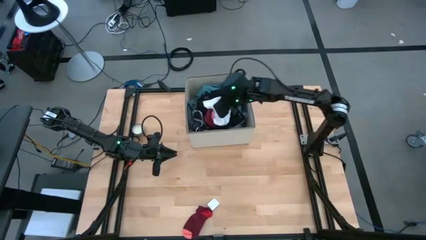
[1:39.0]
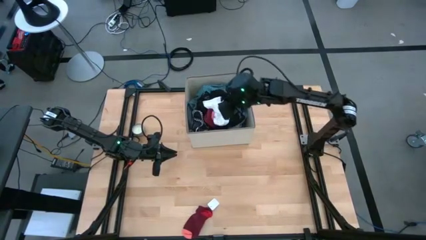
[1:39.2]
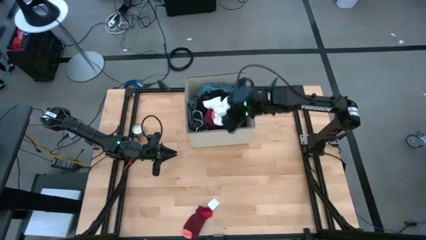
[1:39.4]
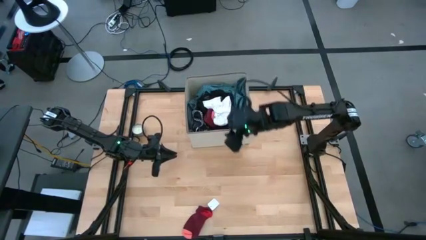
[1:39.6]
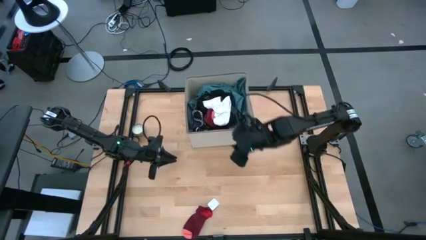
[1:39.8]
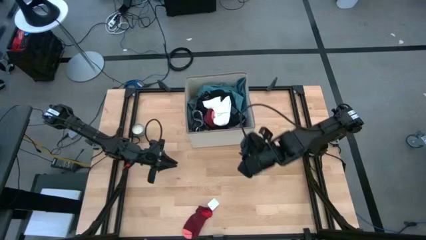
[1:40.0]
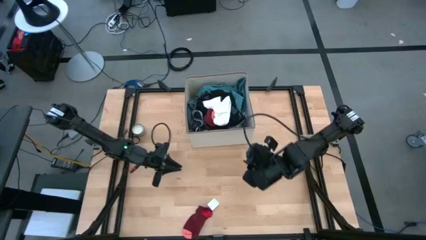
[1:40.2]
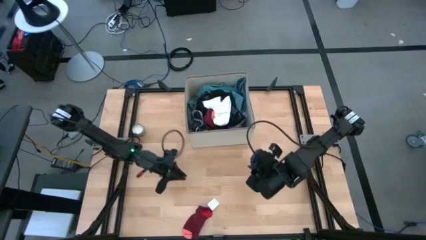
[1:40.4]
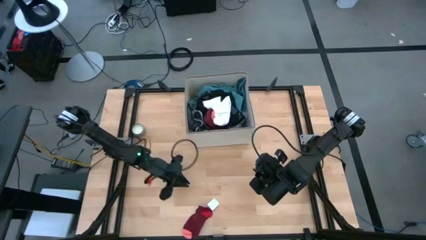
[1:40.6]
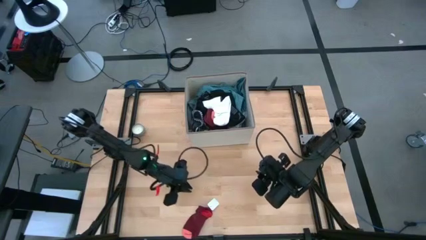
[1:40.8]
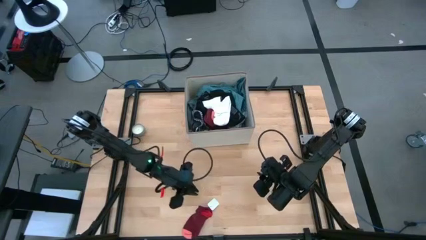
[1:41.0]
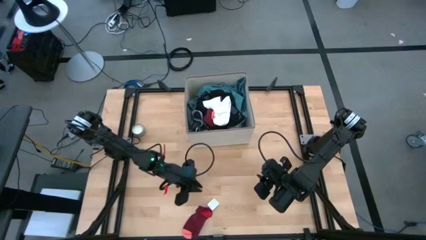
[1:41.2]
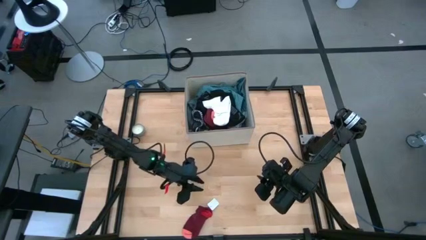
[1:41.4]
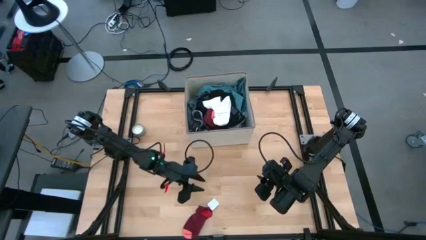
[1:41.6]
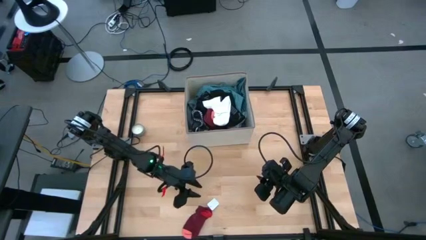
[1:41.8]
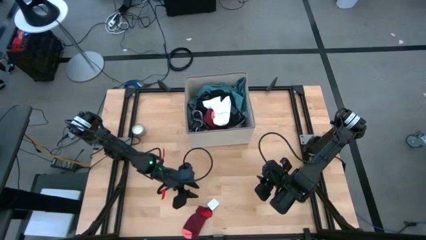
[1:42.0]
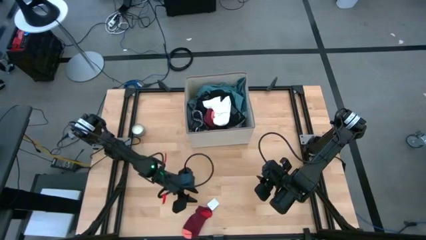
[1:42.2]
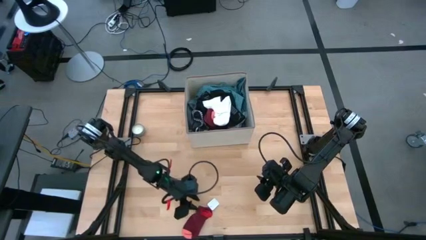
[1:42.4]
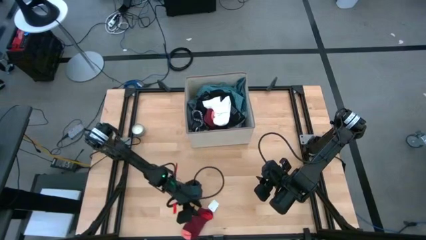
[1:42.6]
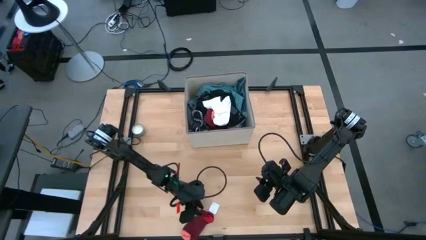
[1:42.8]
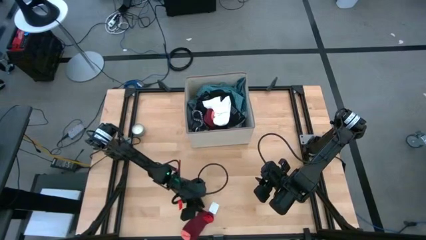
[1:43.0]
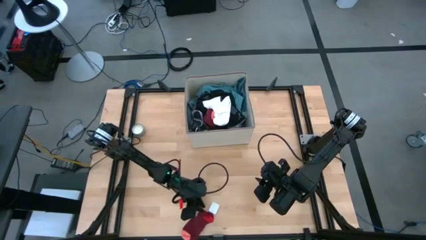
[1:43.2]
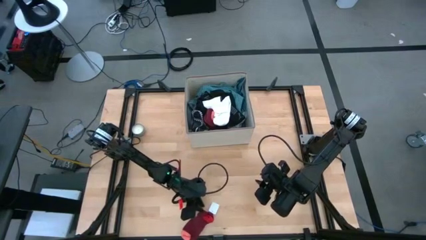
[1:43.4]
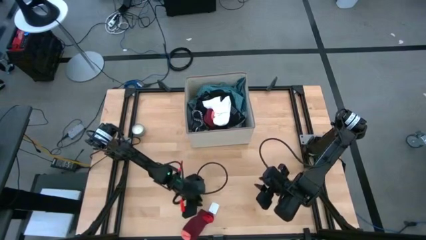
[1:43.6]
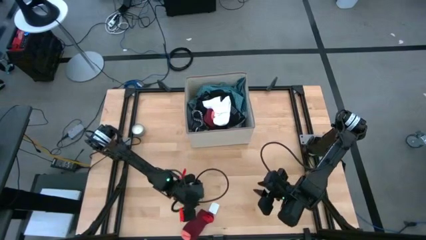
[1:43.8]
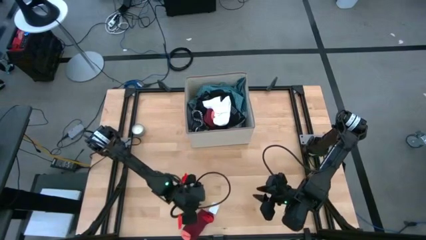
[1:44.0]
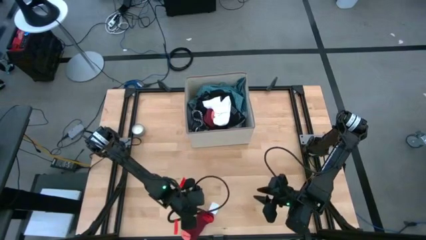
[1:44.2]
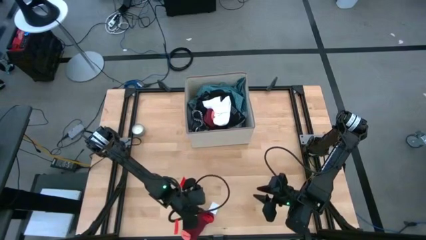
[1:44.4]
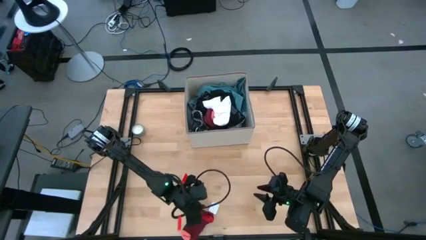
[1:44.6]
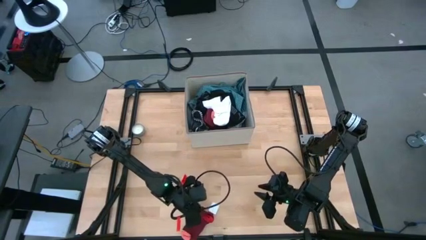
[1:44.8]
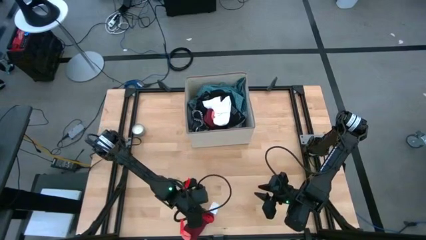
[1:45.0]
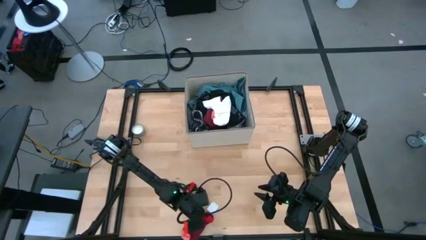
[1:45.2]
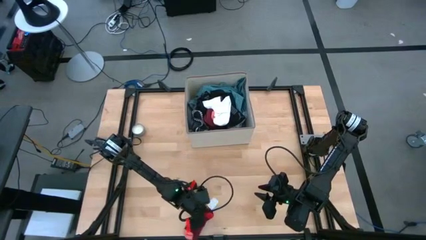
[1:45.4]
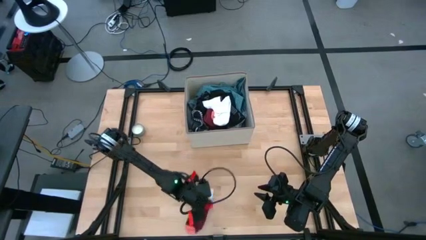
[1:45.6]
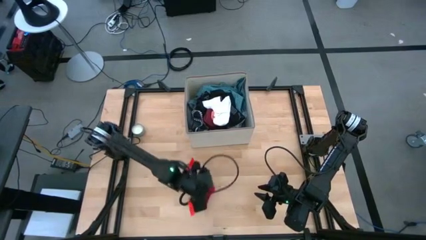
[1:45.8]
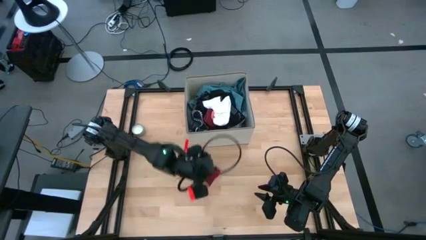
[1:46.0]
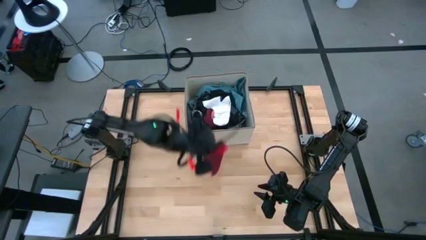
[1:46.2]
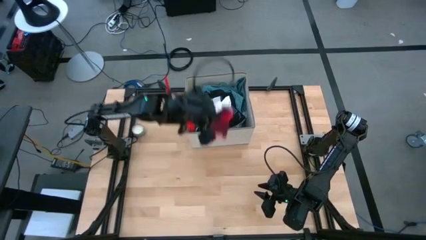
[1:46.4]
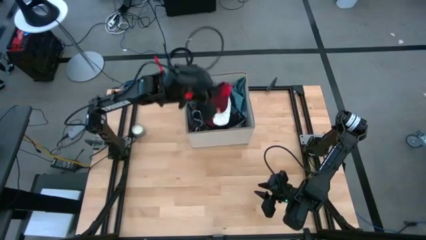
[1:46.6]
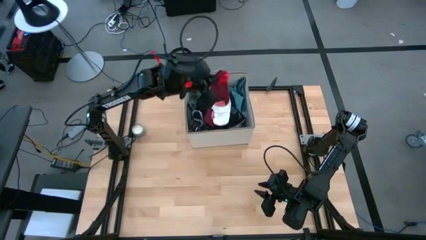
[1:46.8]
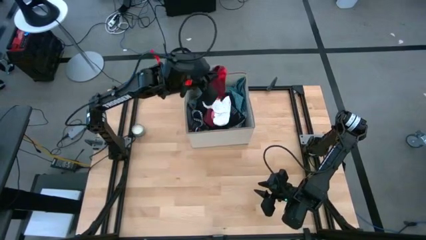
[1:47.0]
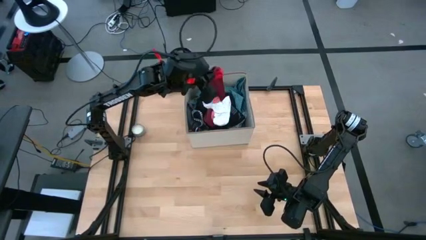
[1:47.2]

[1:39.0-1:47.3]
Task: Sort clothes
Put the red sock into the laundry organizer

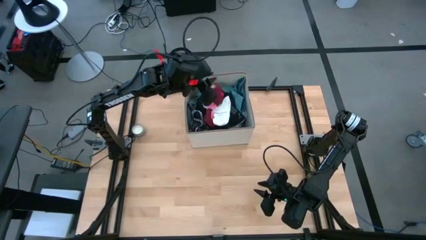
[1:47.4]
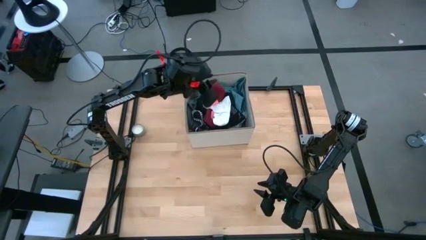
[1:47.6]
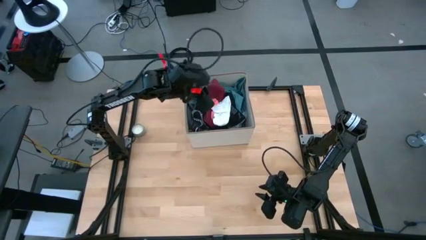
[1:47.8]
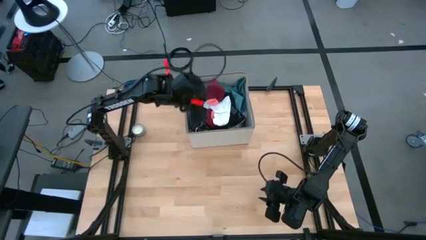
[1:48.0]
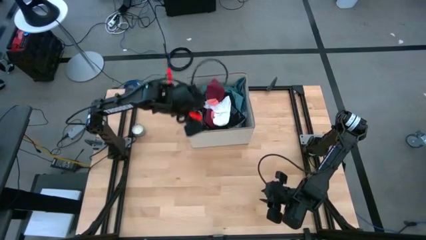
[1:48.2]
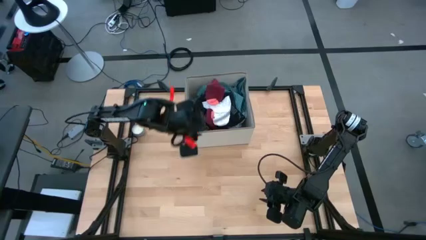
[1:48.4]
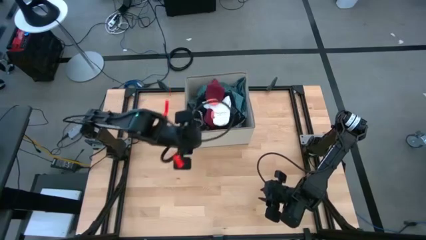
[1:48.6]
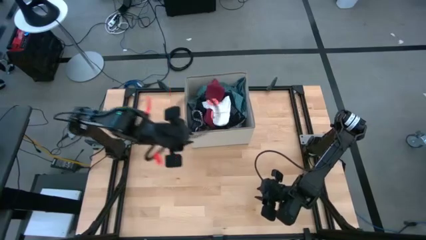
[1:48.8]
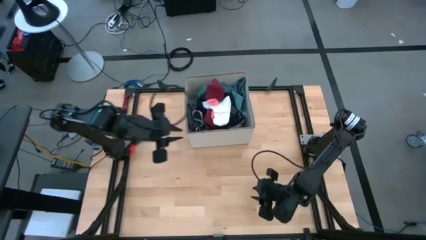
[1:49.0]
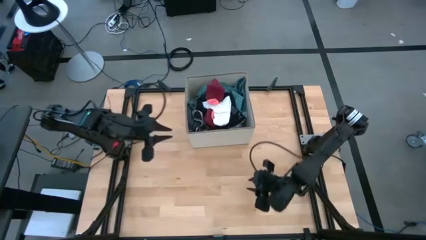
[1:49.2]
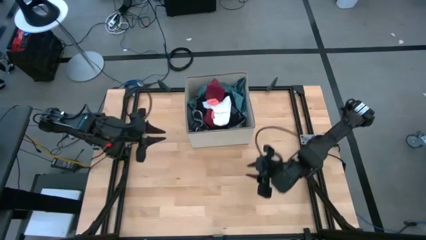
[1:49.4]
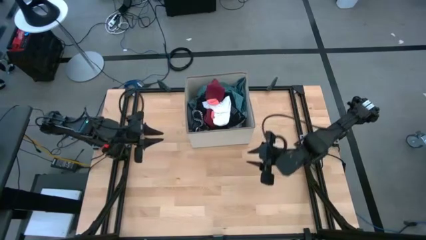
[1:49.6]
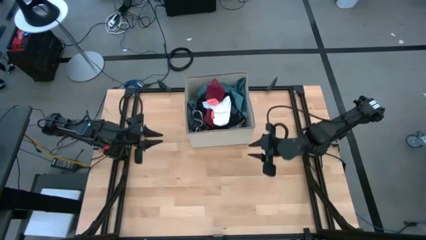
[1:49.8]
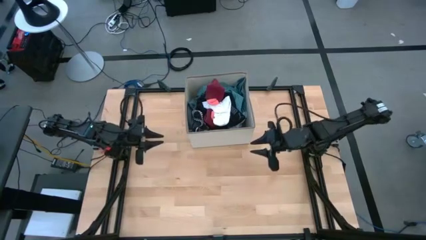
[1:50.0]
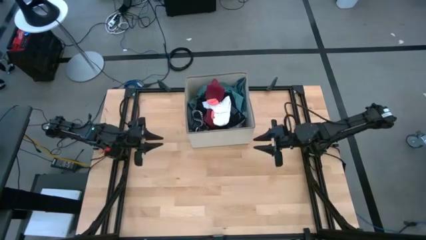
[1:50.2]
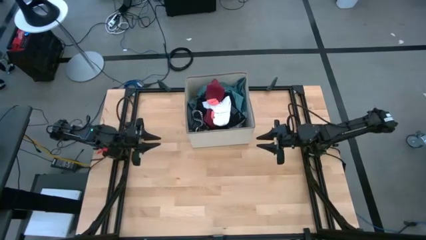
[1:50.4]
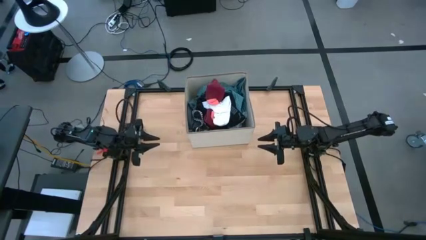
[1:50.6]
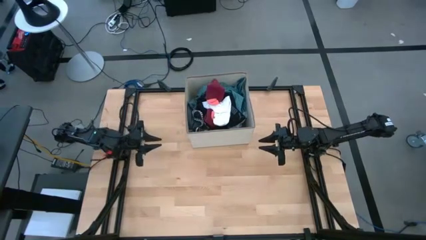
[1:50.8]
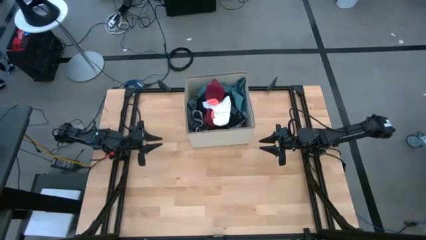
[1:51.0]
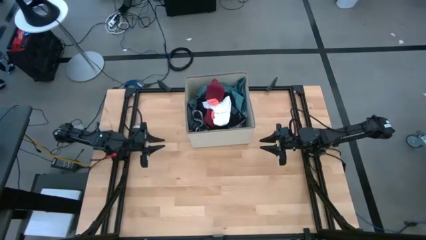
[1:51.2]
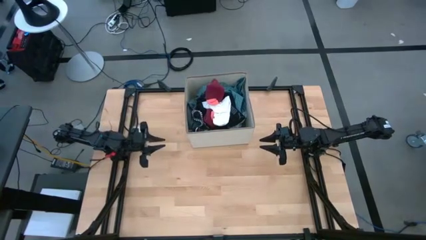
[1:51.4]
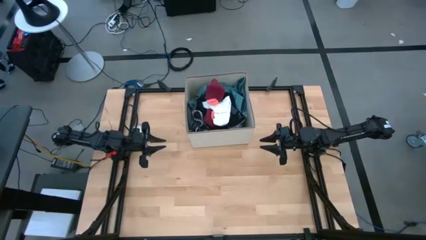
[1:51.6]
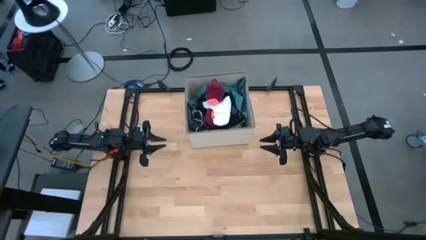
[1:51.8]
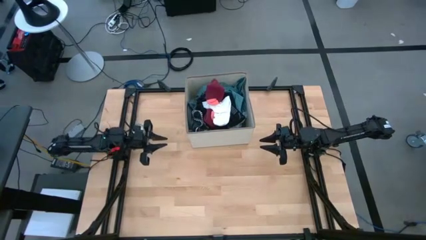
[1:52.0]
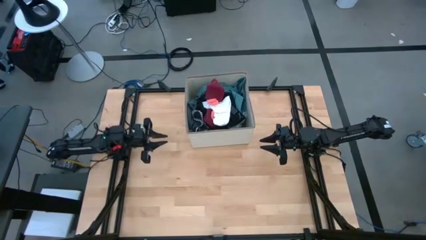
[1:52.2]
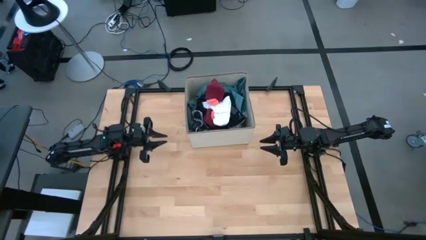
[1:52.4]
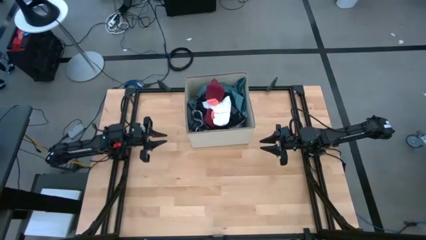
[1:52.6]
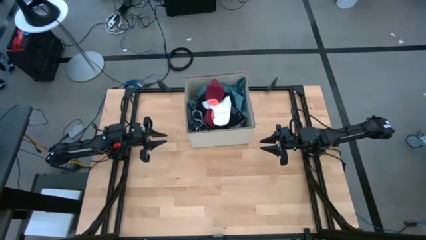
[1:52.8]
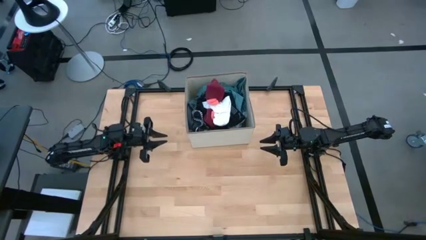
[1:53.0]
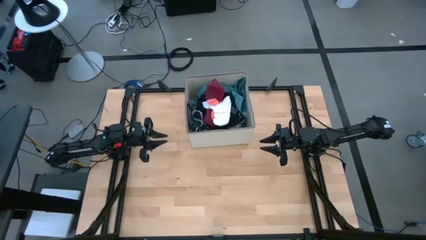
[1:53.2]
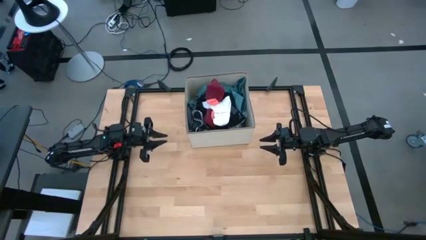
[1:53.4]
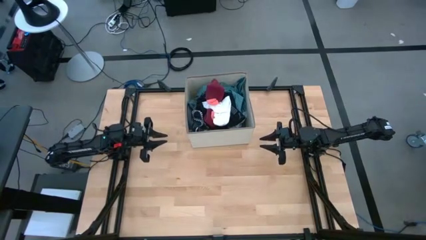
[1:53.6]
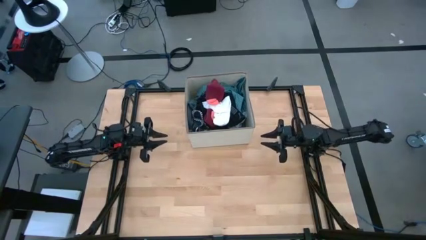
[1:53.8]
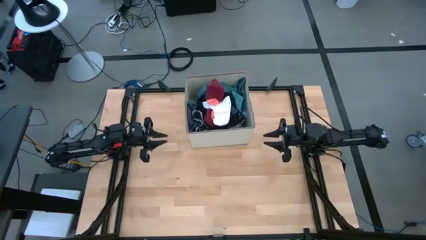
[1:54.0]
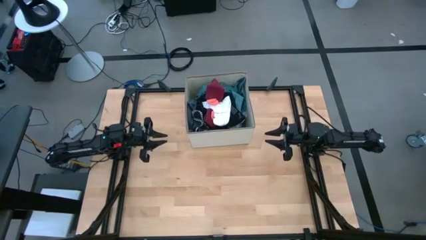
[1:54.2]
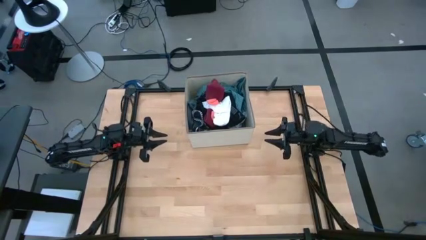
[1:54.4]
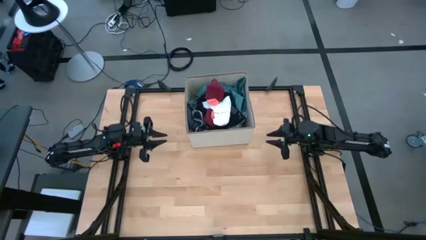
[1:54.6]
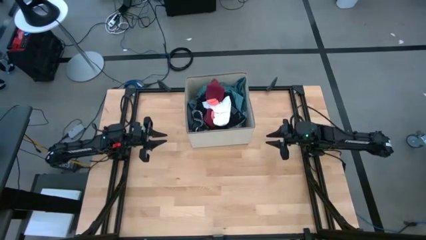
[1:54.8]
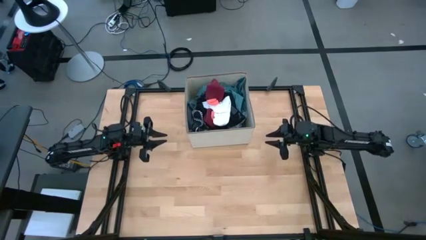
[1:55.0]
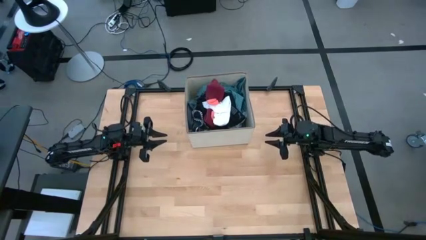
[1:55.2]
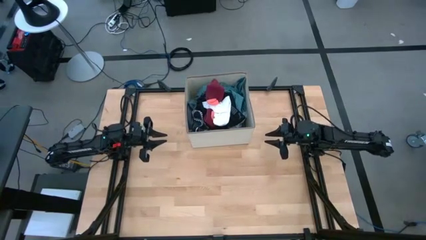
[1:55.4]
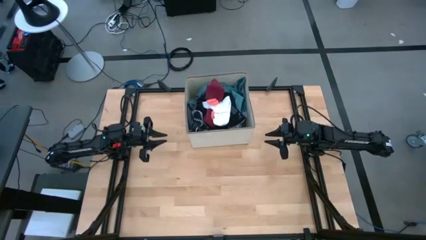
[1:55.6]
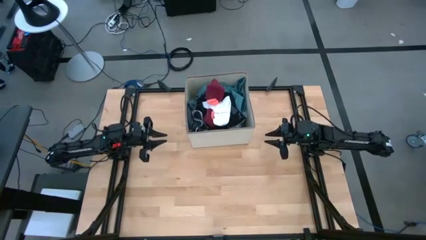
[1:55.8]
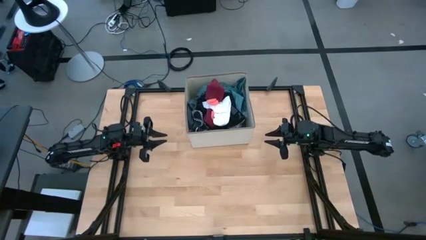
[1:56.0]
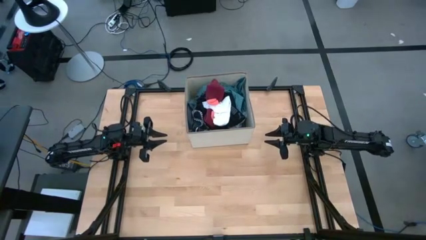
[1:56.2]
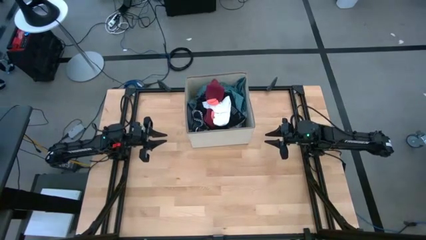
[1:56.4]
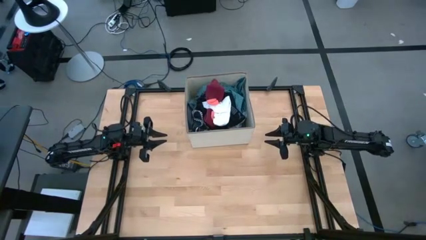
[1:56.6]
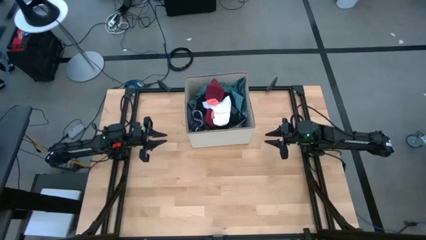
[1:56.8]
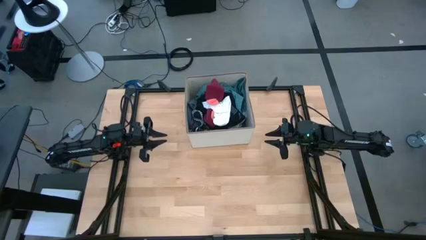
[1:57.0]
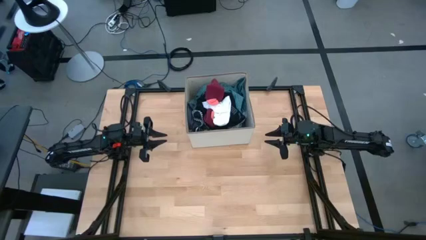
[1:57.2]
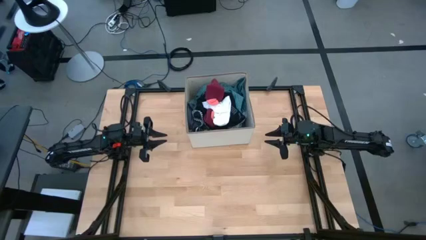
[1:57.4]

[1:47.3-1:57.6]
Return to Home Position
